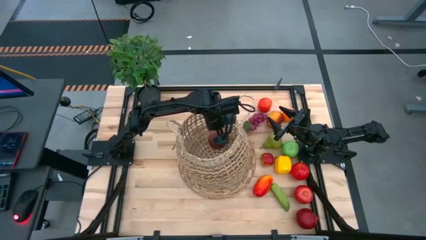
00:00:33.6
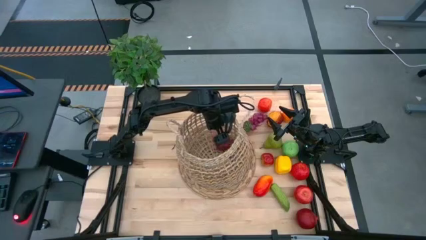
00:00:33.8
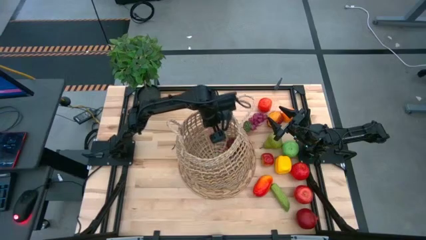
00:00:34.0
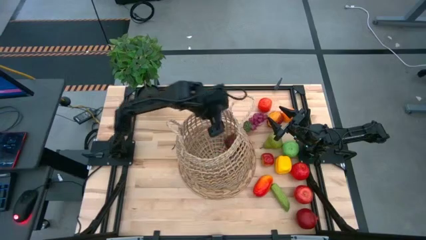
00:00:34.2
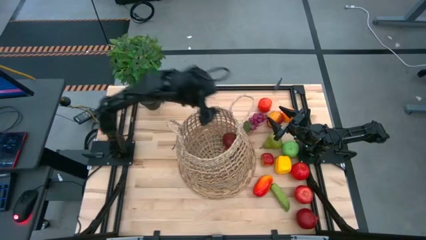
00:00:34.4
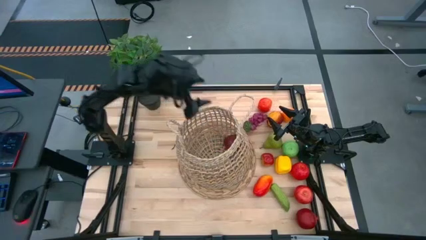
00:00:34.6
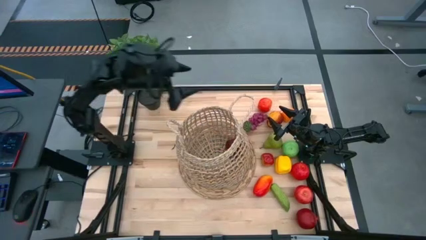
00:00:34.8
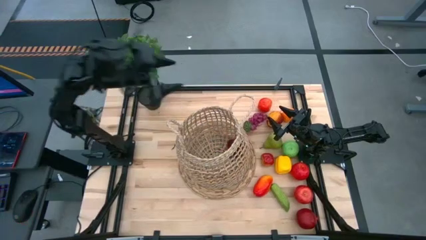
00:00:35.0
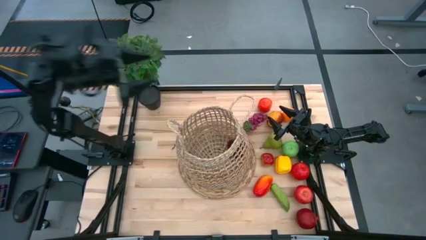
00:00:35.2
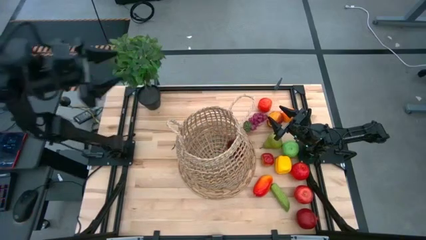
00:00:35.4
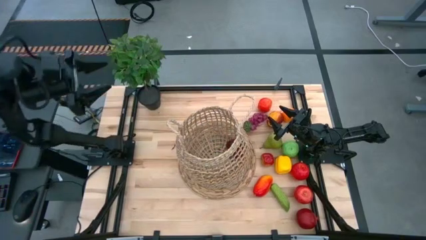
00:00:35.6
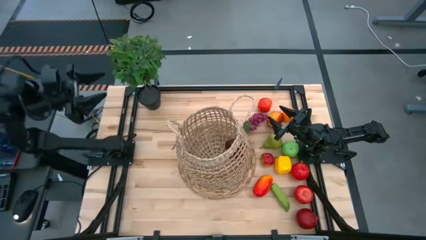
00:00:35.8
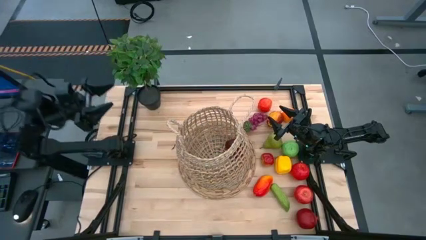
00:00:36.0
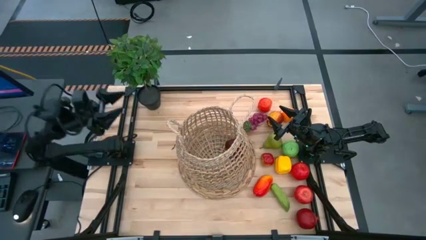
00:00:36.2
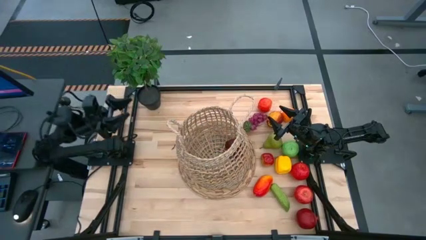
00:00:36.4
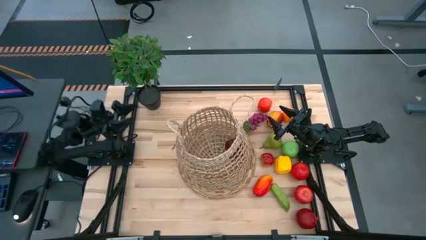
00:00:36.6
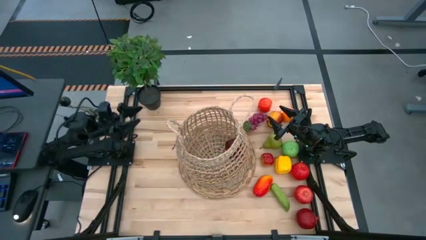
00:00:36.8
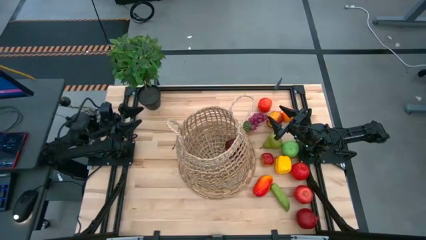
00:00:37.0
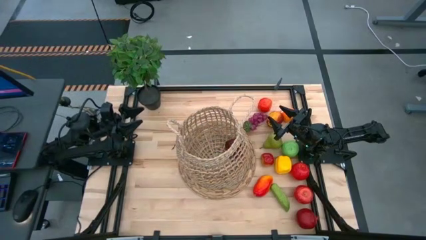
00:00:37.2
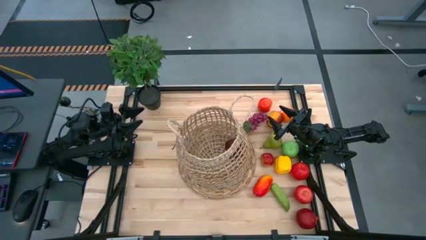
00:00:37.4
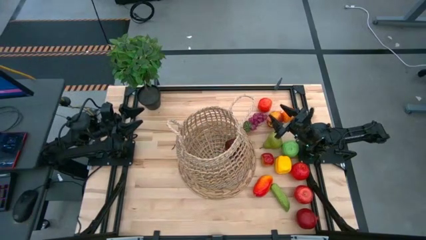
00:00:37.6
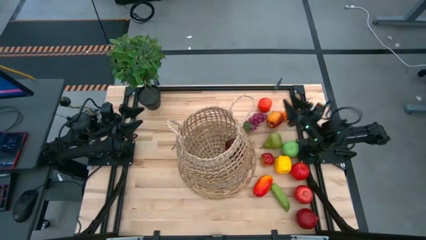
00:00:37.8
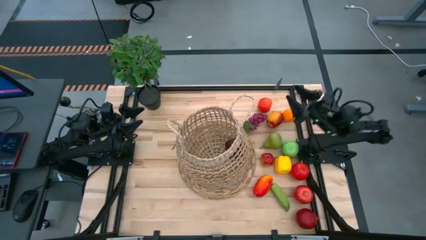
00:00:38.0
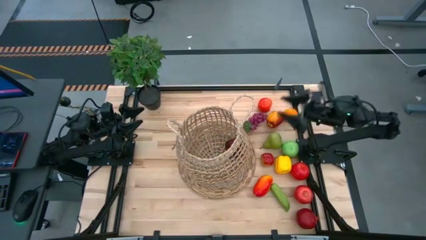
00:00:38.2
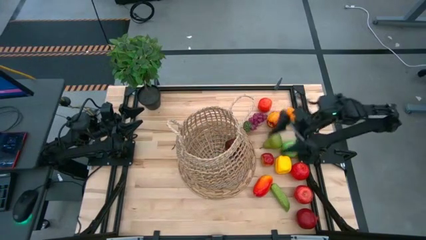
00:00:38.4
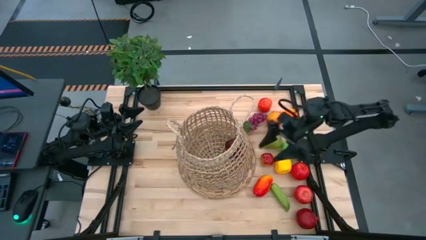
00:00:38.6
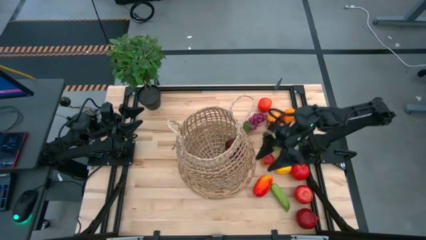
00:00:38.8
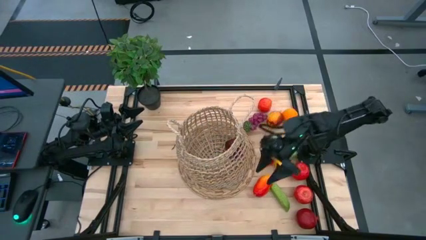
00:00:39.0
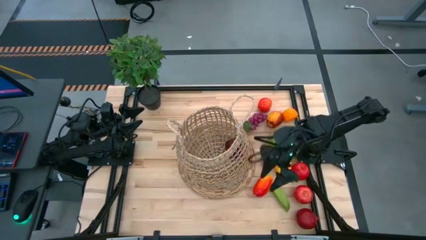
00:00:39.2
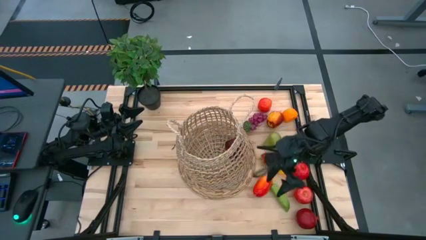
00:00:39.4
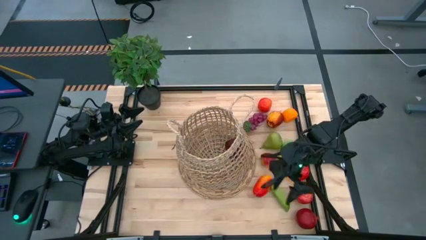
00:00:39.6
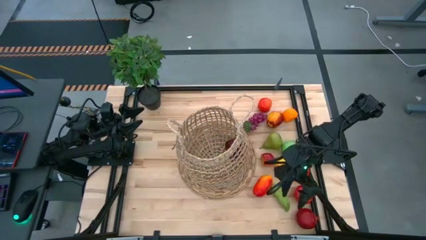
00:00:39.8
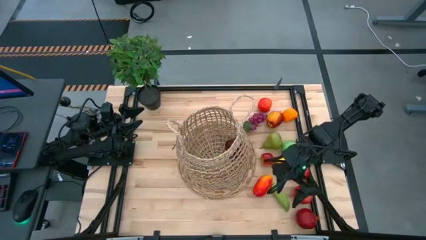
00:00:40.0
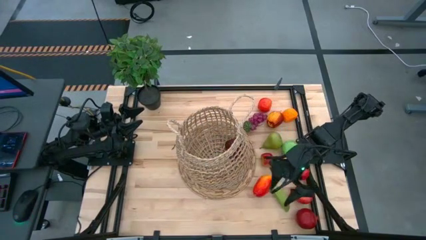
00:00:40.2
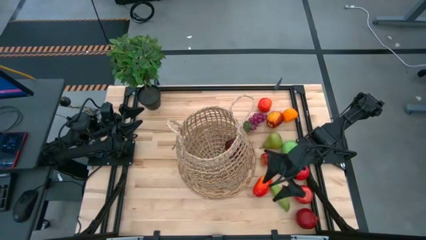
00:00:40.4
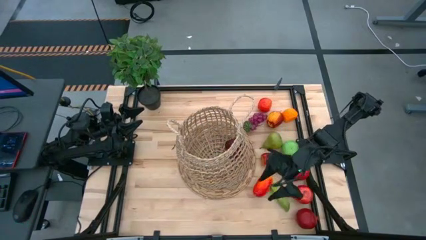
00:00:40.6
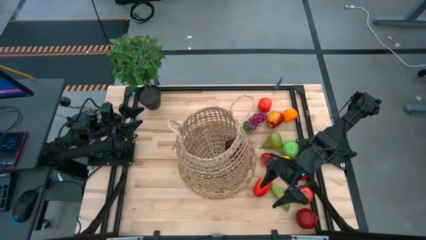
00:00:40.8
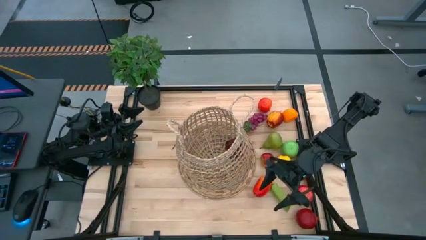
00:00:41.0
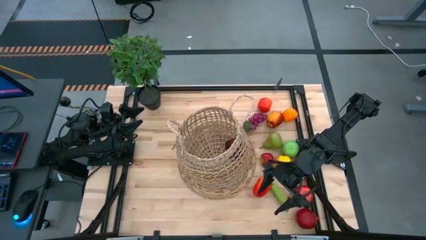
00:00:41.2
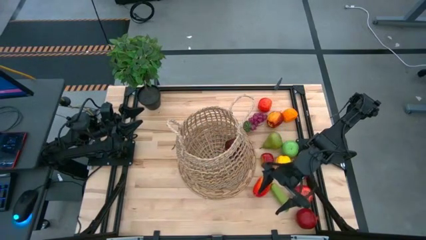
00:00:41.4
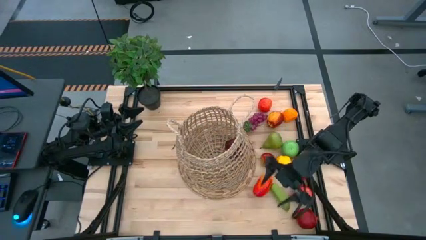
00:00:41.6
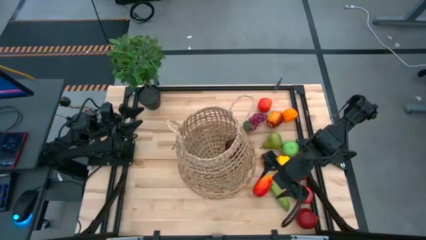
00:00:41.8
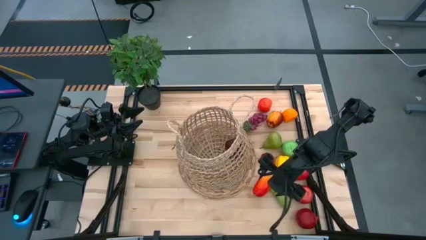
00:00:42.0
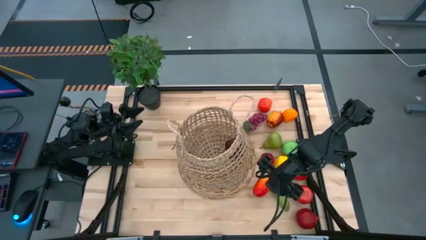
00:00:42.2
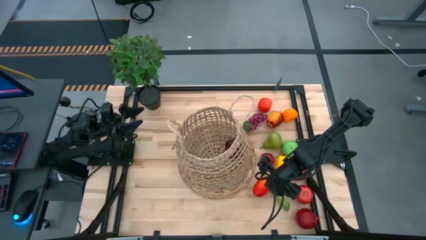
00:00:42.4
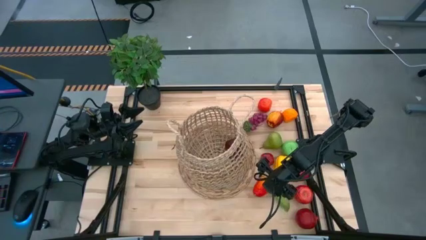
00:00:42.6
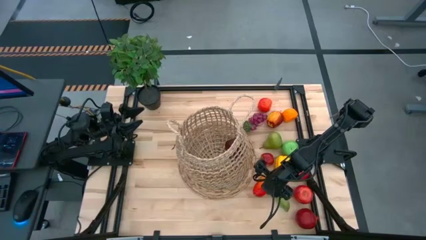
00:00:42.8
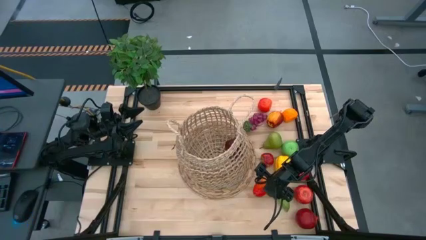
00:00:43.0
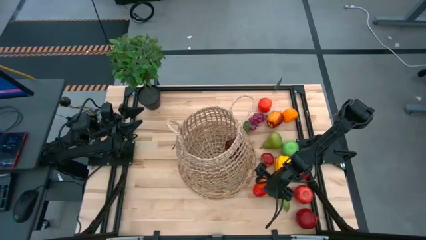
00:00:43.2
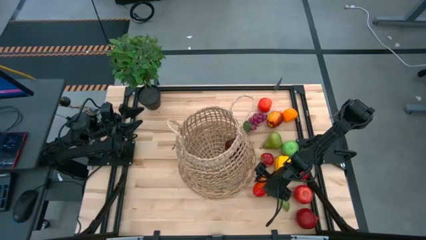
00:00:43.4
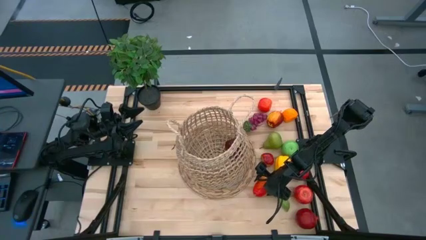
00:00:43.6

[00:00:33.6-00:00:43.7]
Task: Build produce basket
Put the yellow mango into the brown basket

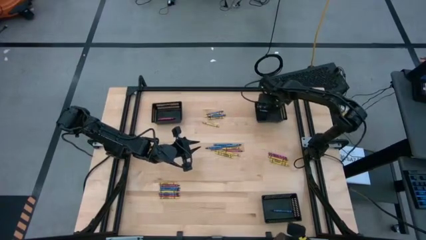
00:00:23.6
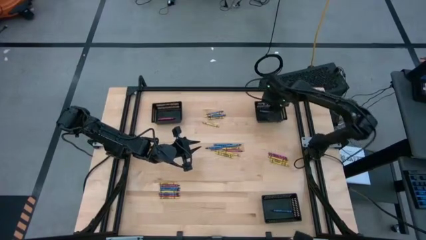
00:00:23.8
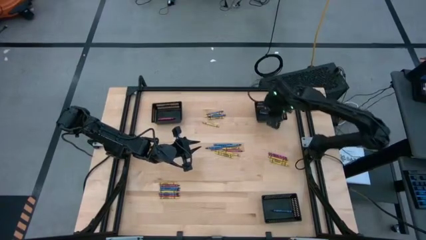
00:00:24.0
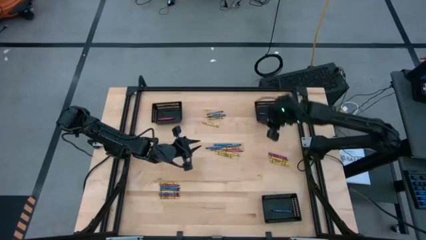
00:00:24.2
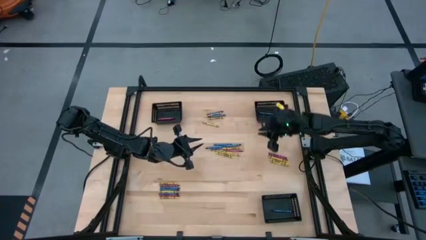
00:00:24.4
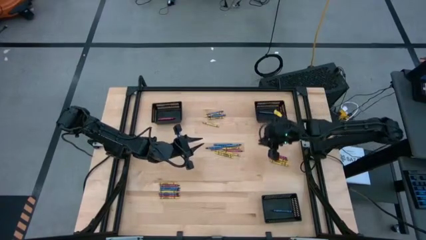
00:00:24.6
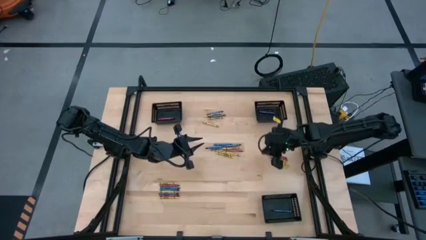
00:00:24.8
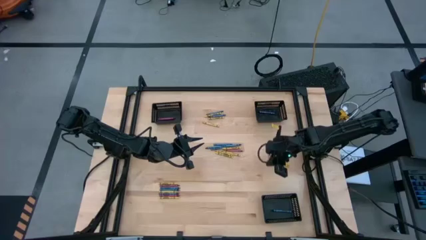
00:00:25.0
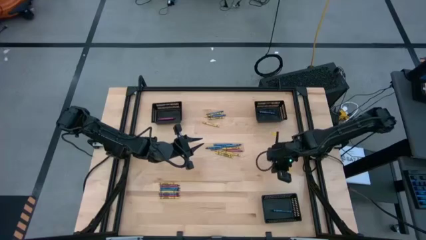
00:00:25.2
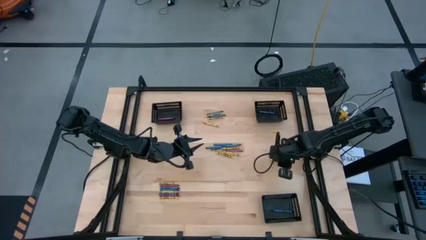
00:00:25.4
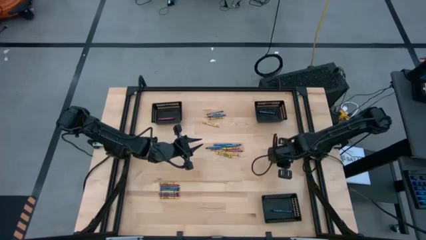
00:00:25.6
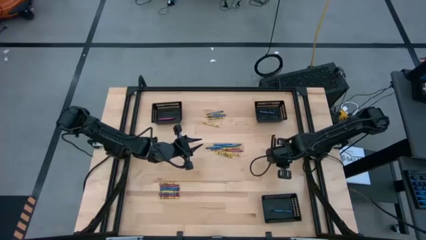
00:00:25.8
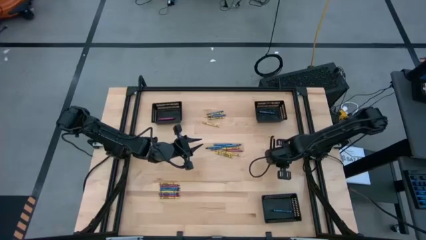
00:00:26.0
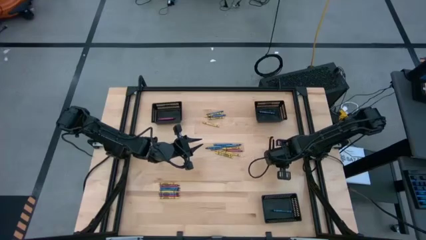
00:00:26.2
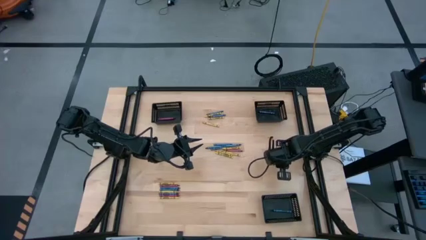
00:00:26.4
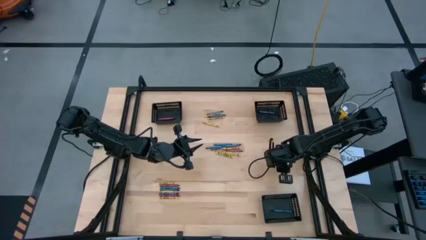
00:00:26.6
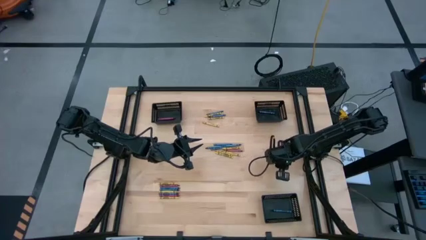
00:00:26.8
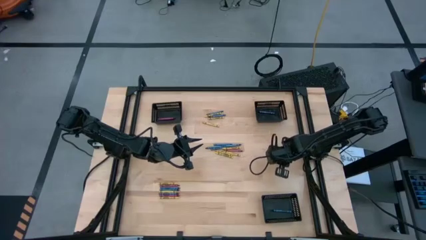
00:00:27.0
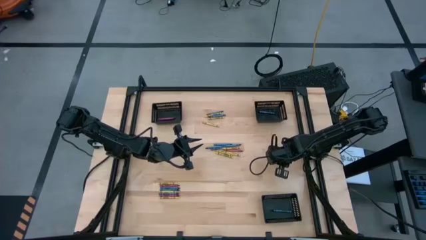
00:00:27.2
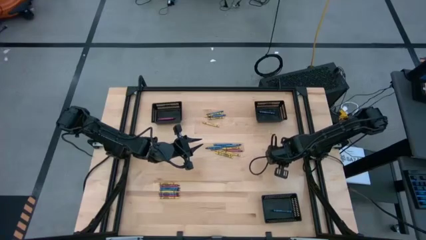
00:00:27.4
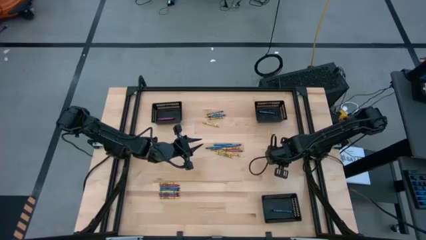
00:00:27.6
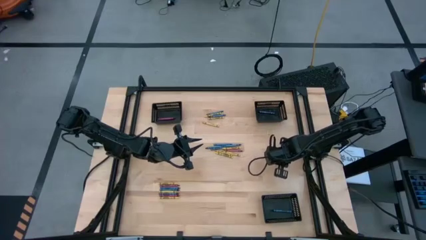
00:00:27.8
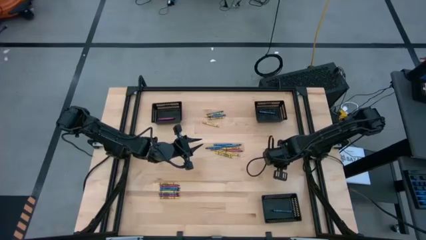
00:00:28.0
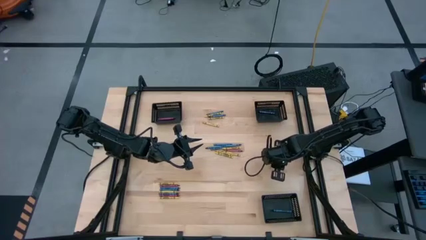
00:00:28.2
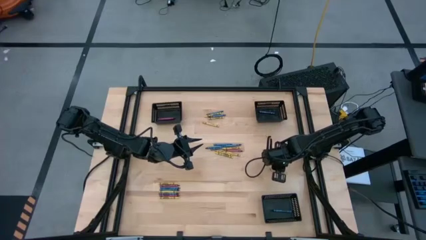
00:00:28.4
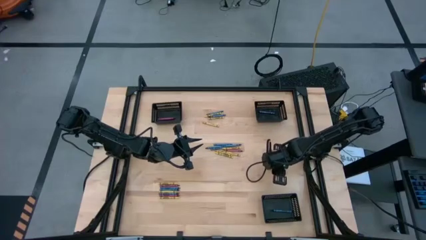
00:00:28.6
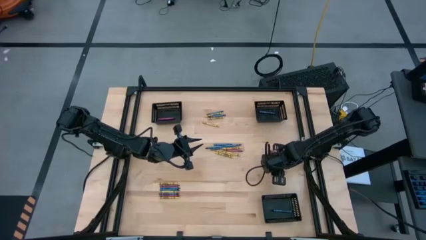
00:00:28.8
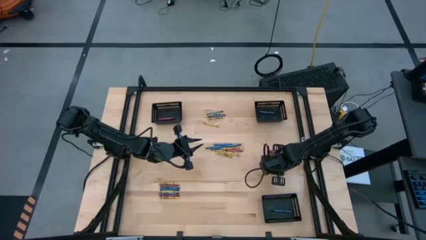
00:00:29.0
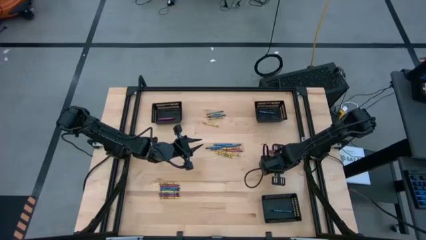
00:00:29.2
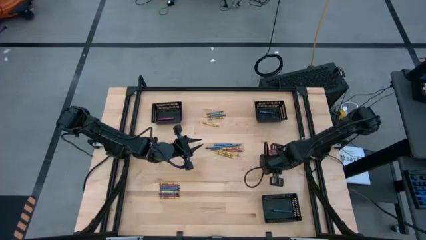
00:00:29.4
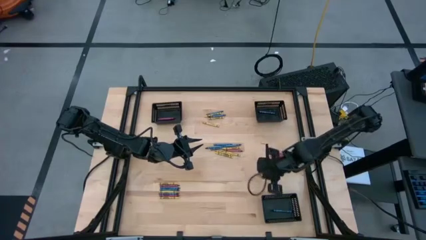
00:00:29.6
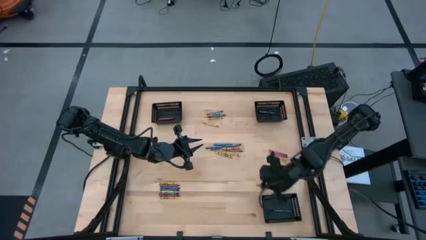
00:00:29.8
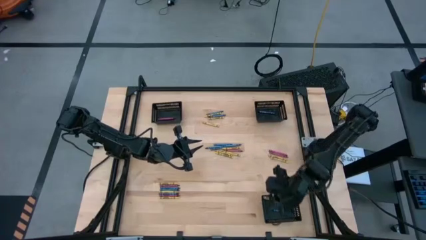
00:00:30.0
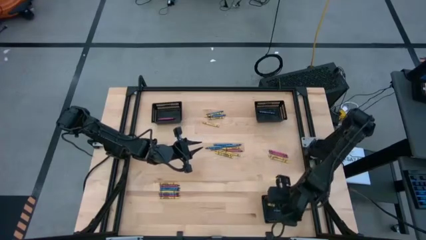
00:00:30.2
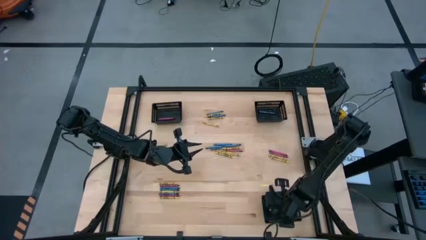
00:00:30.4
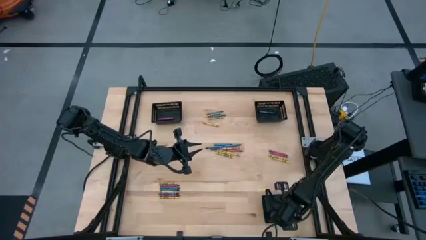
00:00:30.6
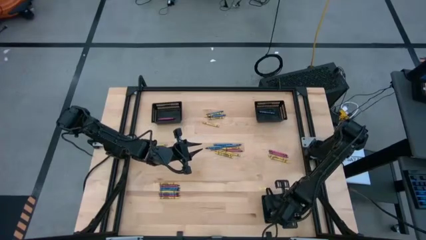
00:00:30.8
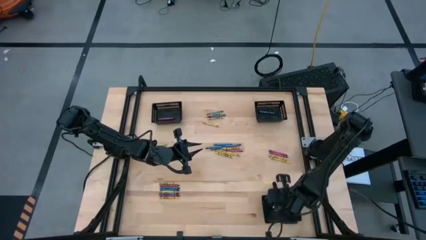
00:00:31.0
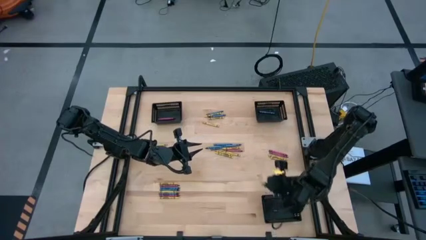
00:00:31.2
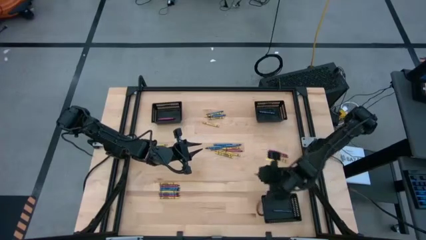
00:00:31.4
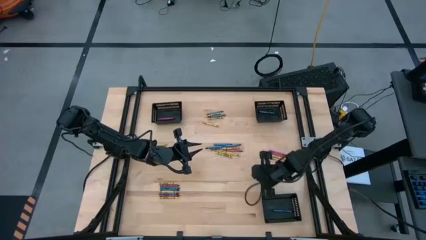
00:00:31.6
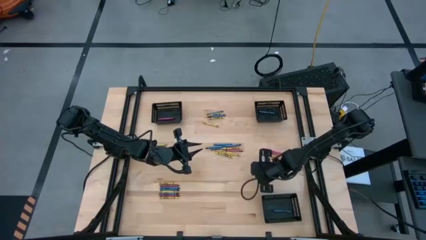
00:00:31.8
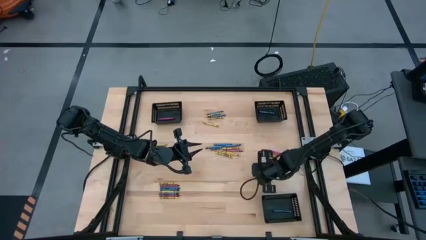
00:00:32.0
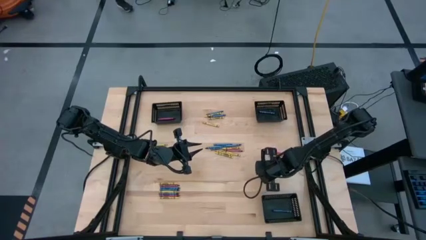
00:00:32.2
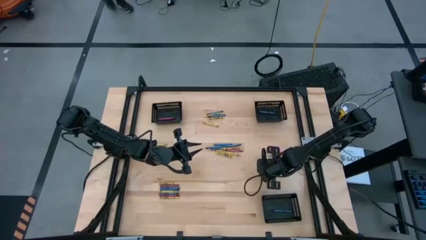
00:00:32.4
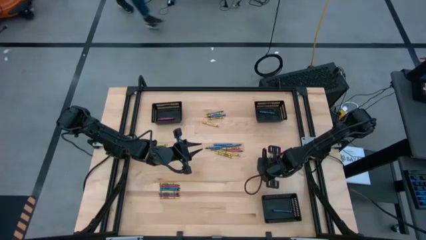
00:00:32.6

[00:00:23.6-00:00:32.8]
Task: Sort crayons
Put the yellow crayon into the bottom black bin
